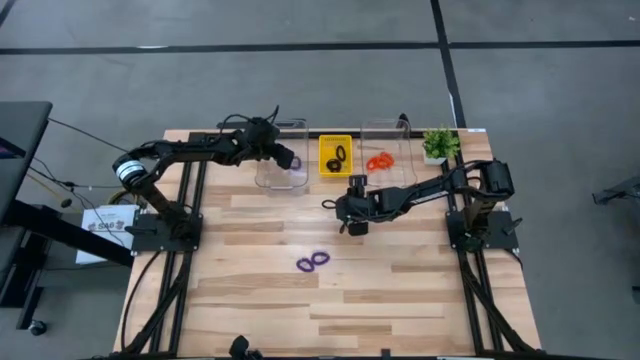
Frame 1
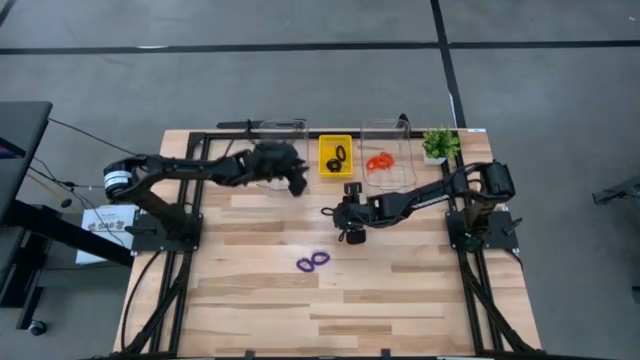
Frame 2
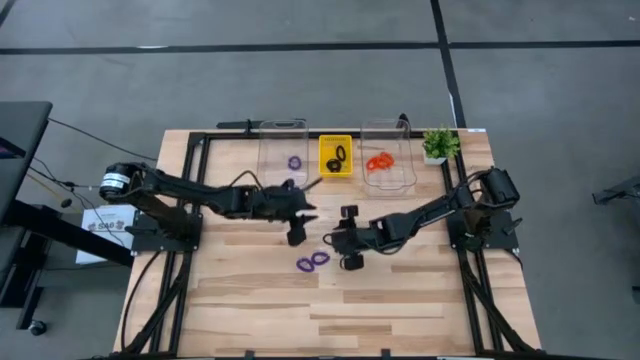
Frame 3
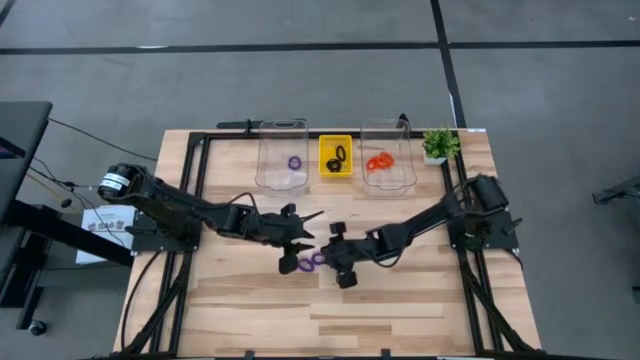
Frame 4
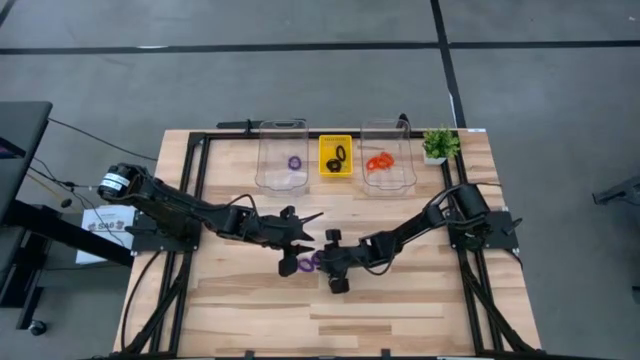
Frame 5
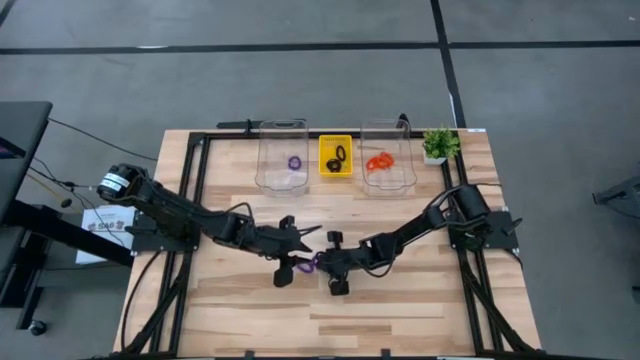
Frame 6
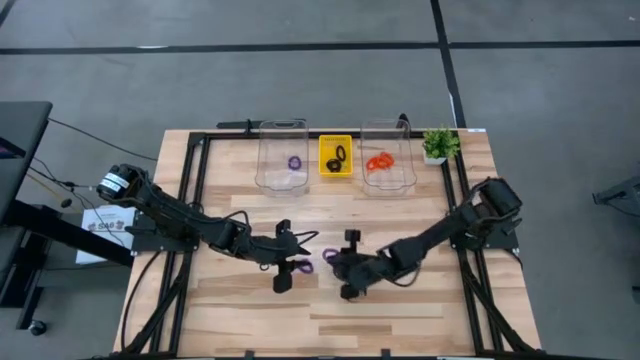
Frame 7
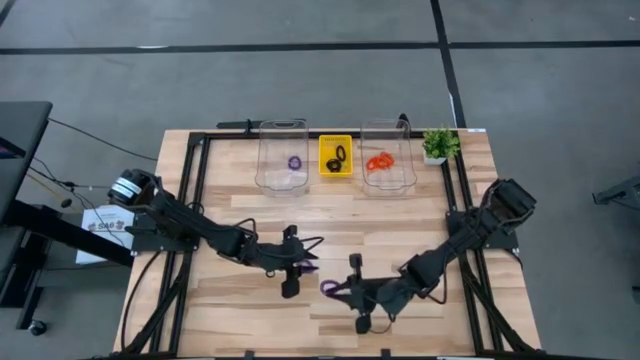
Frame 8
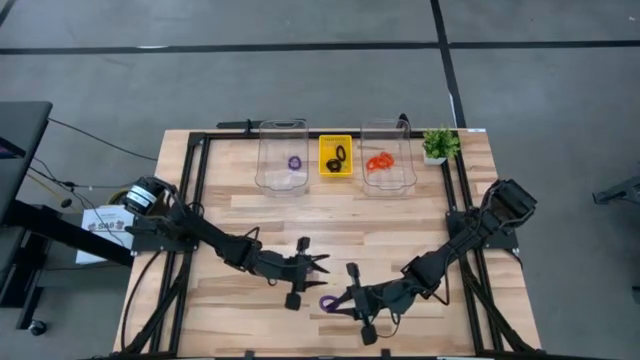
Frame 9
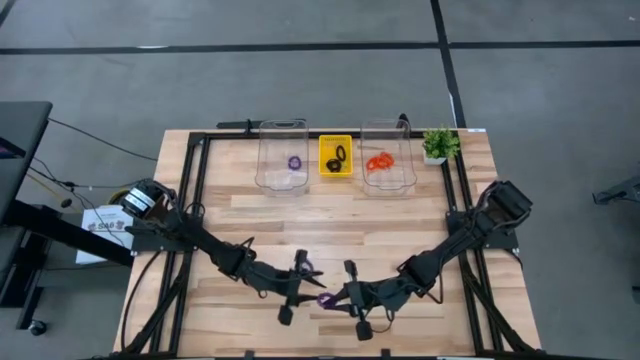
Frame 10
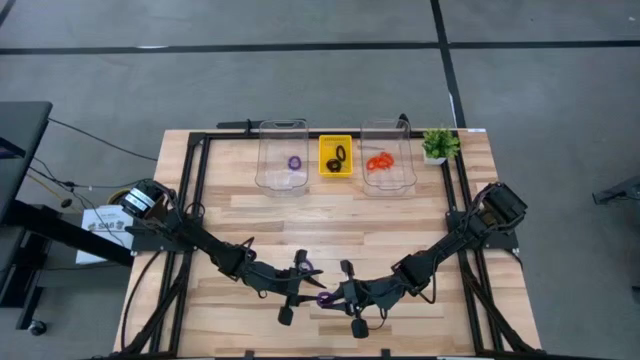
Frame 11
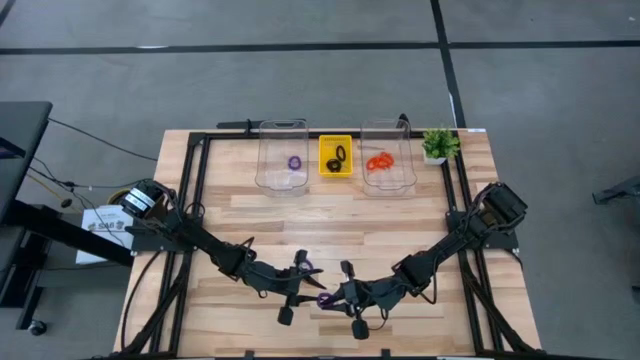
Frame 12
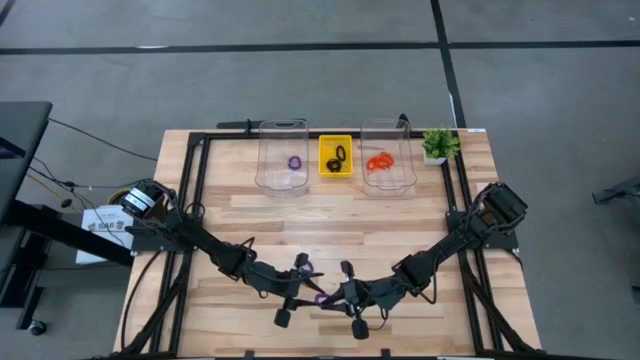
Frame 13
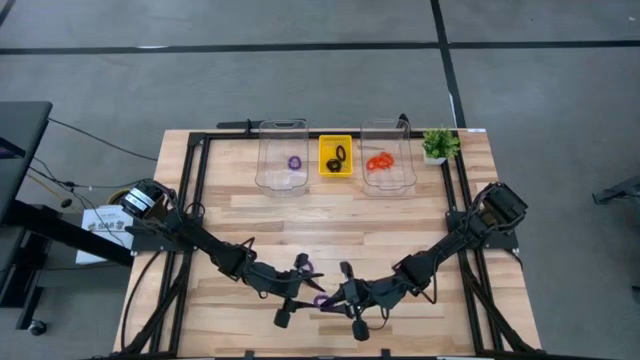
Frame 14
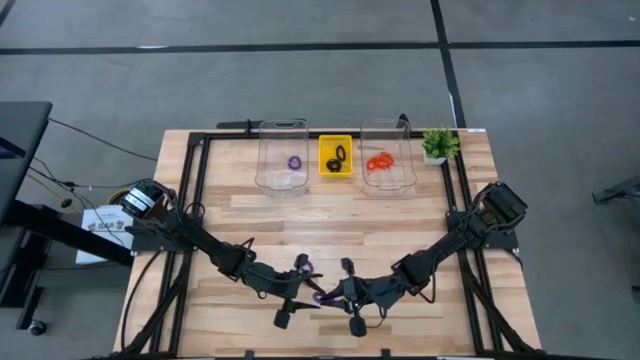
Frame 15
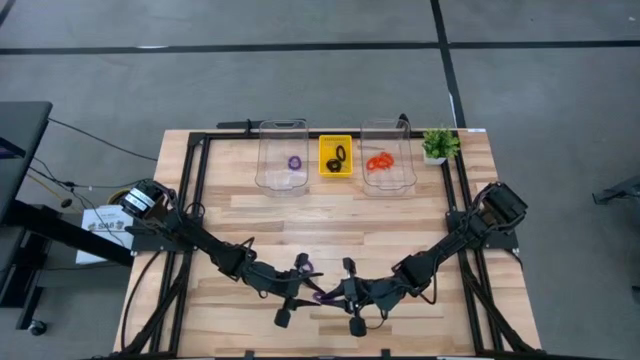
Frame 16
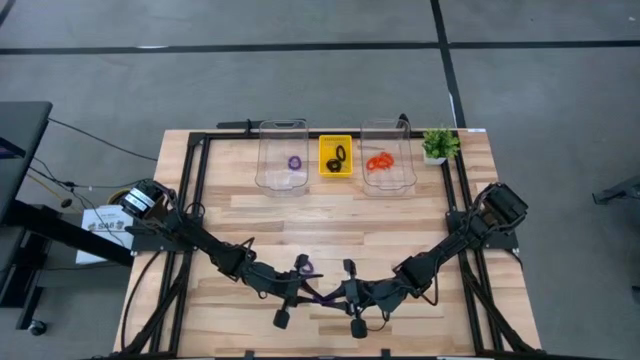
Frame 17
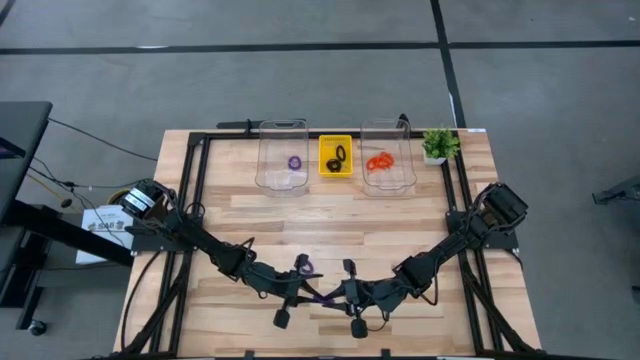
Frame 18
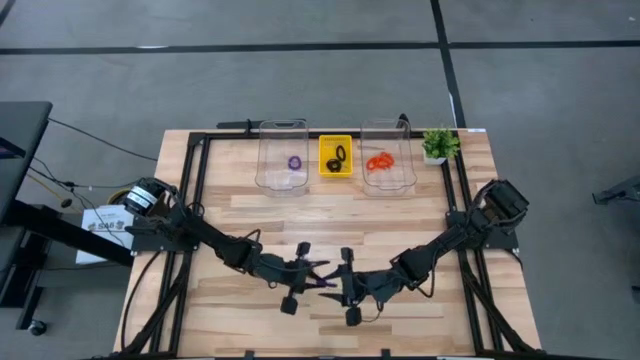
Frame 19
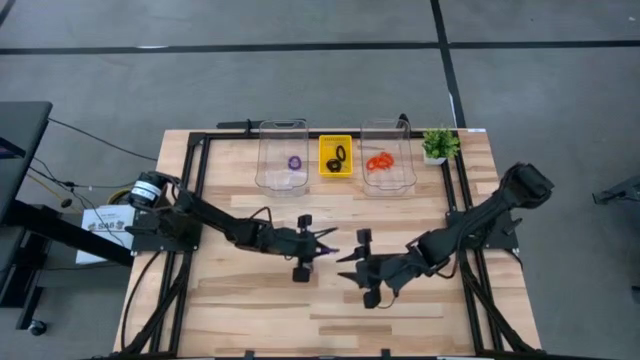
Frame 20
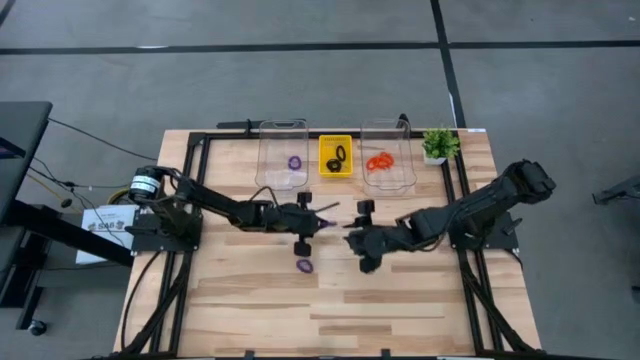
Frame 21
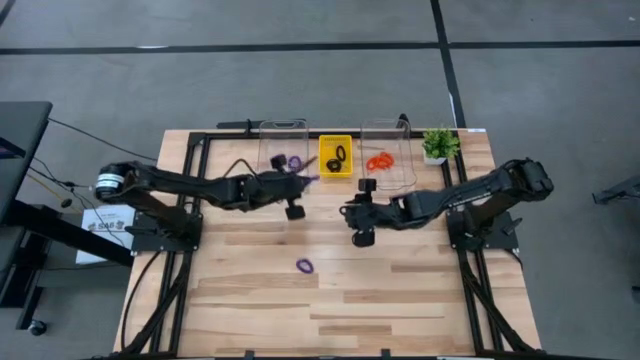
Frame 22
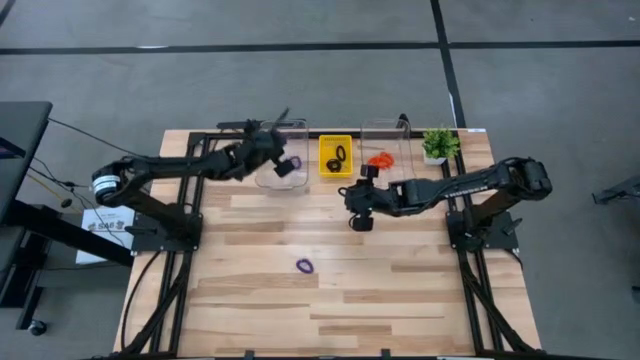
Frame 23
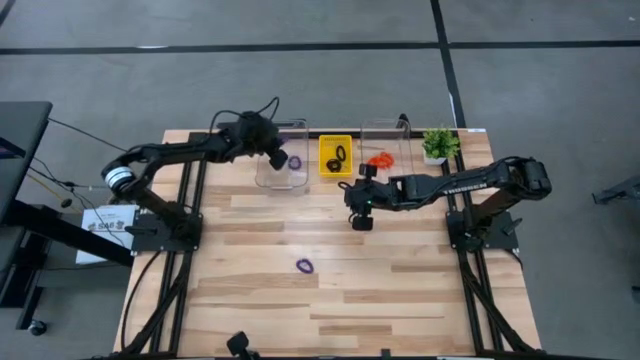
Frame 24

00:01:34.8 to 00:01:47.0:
Task: Sort spring keychains
Put the right purple spring keychain into the left transparent bin

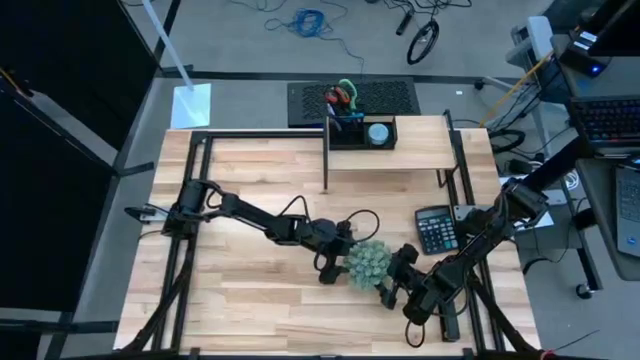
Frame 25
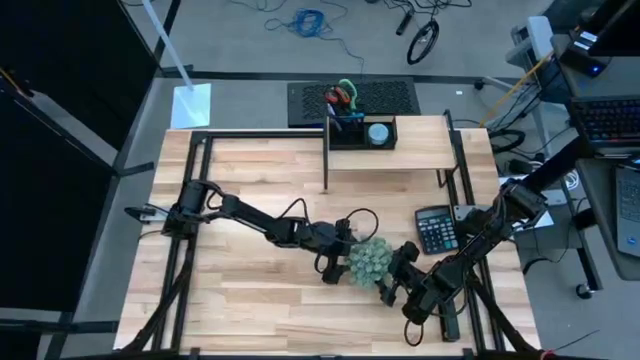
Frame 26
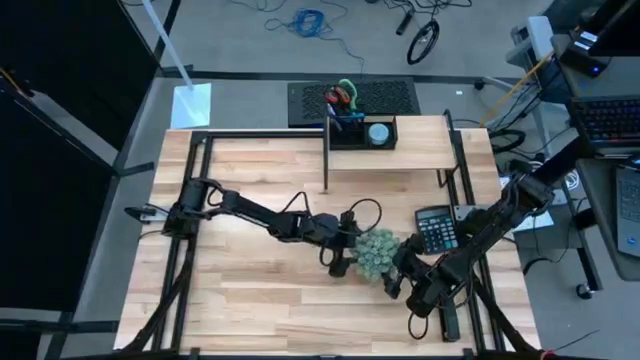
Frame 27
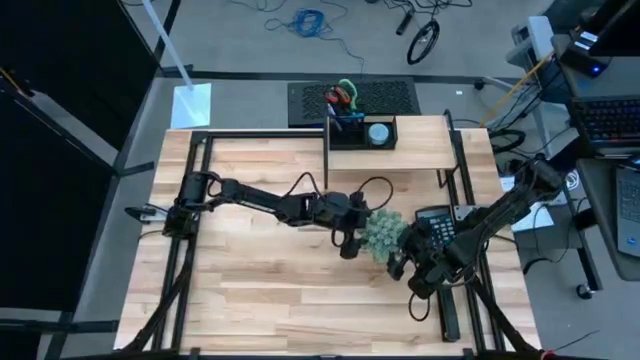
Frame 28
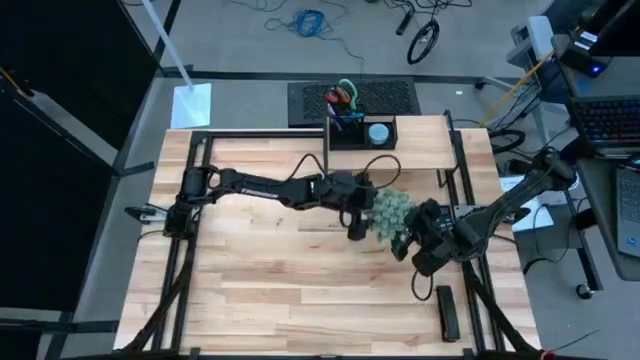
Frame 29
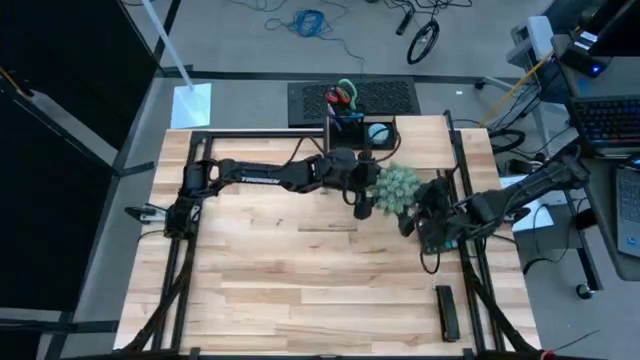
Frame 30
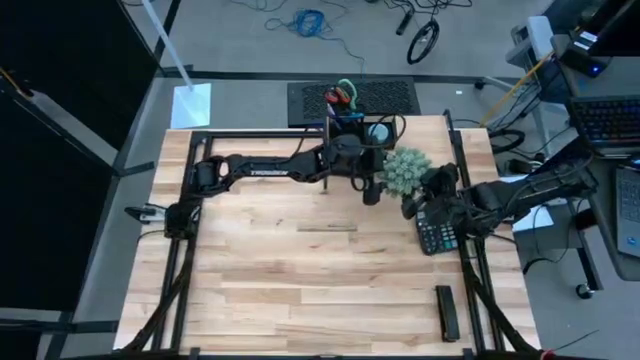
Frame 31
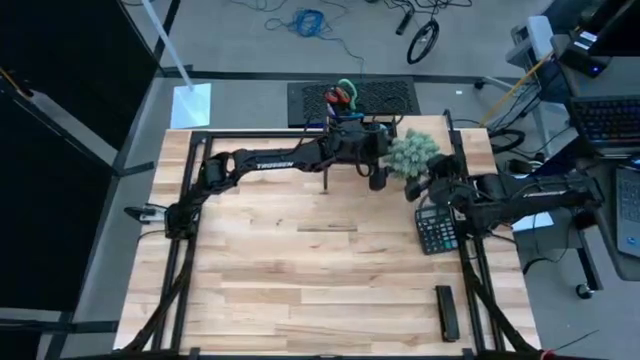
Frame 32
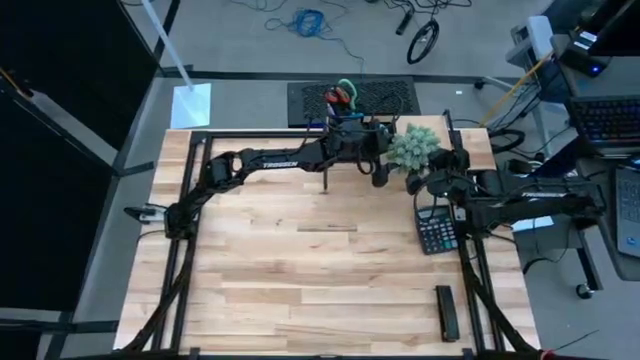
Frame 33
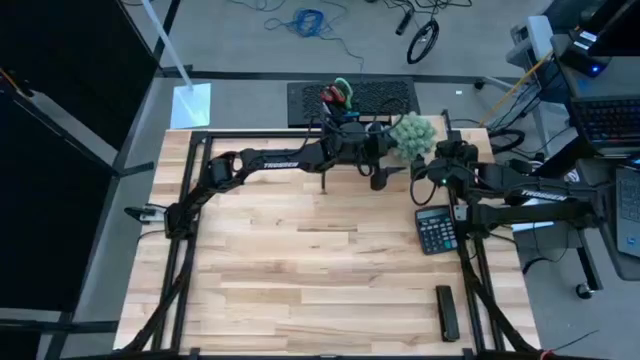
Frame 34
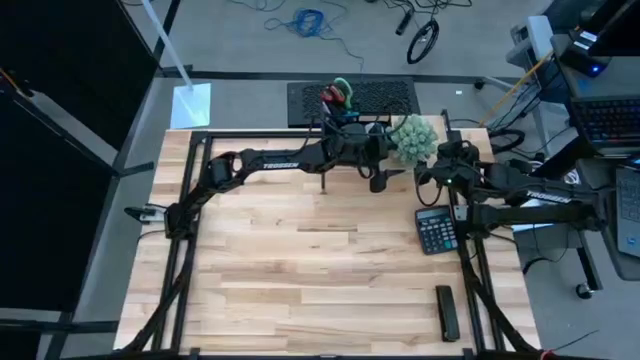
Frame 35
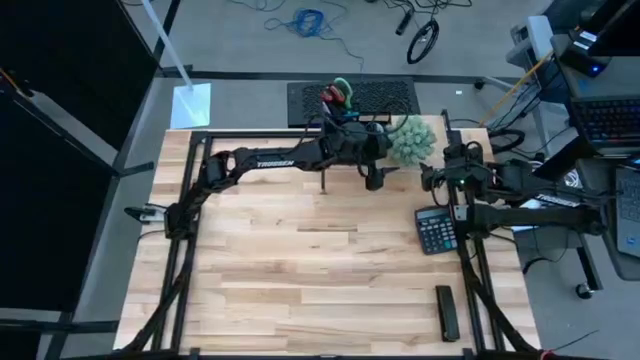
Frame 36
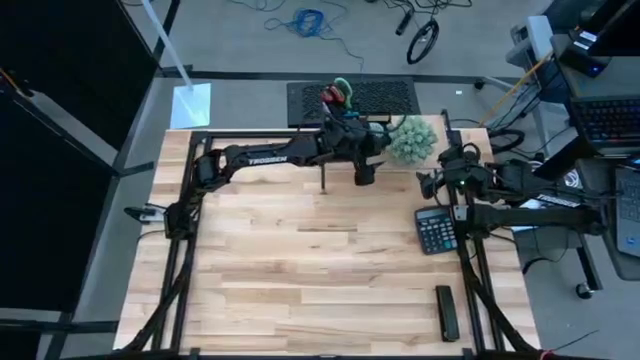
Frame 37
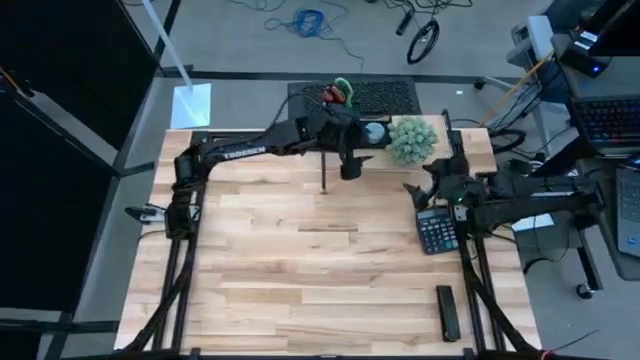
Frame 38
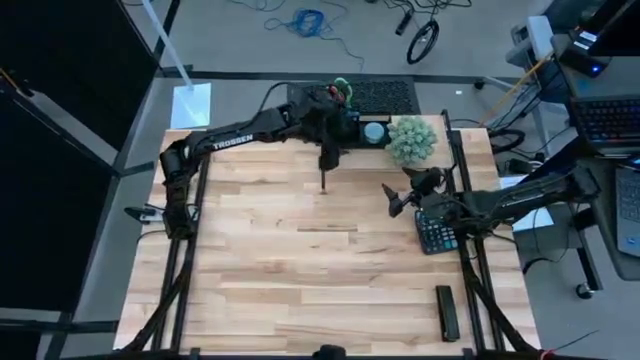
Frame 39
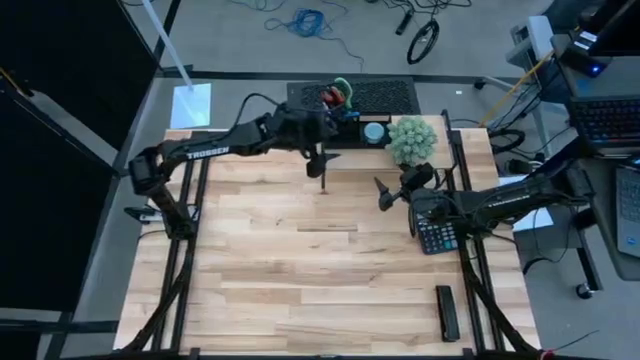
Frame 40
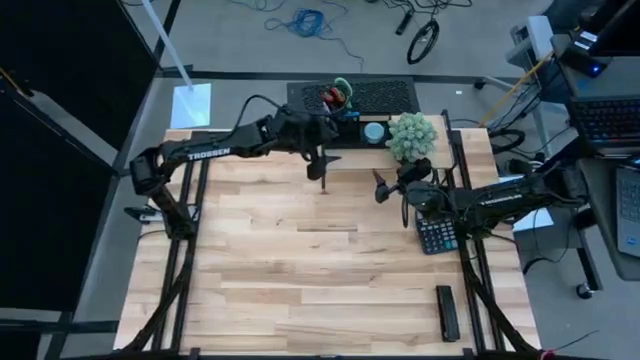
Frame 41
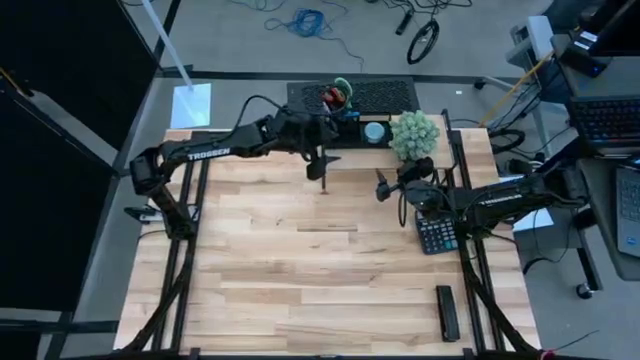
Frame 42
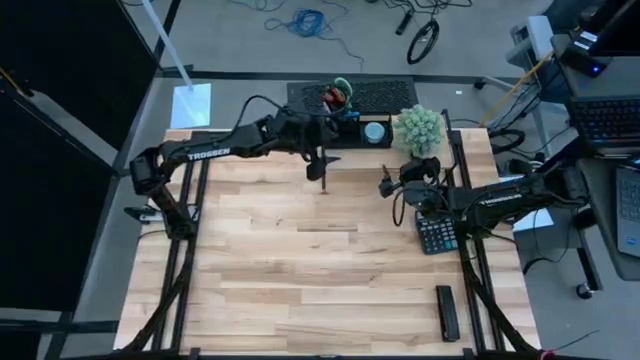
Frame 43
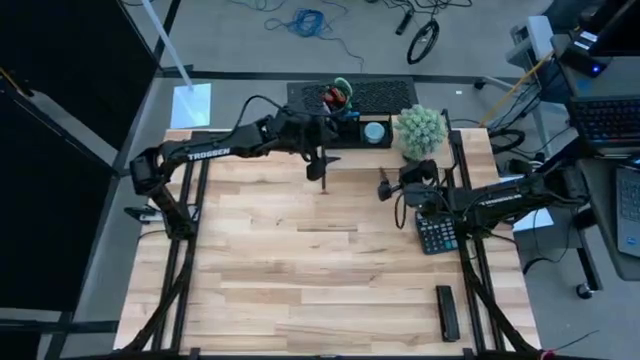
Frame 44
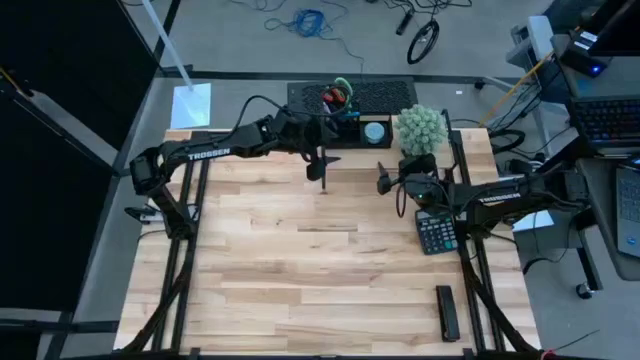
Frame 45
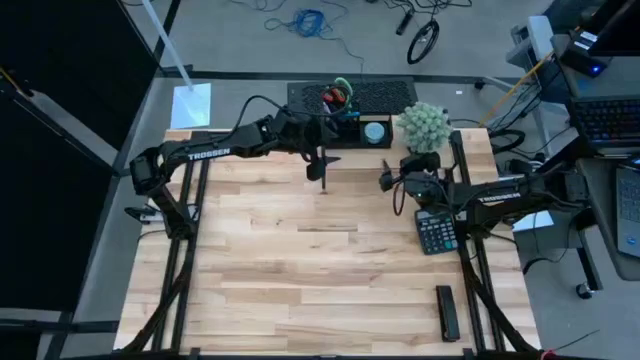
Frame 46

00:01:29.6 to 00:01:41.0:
Task: Pick and place office supplies into organizer
Put the gray patterned vase plant on the wooden shelf
